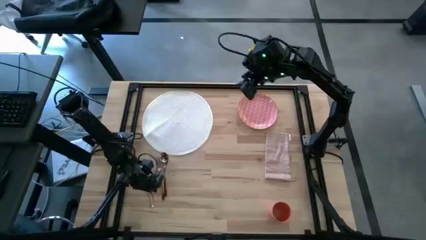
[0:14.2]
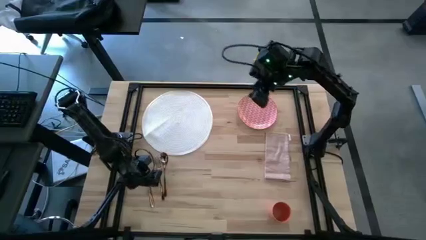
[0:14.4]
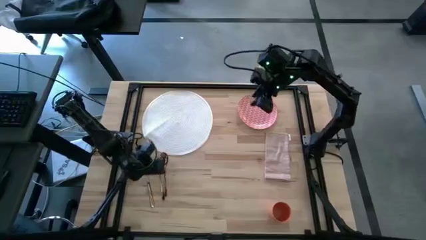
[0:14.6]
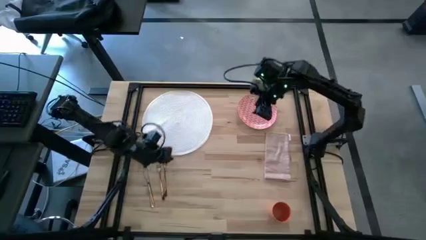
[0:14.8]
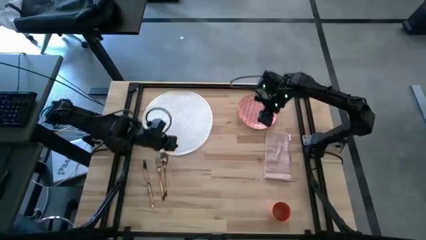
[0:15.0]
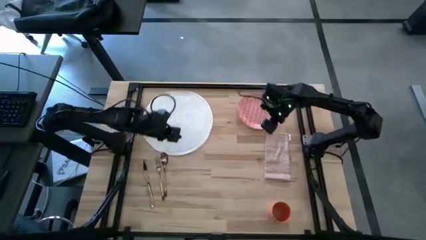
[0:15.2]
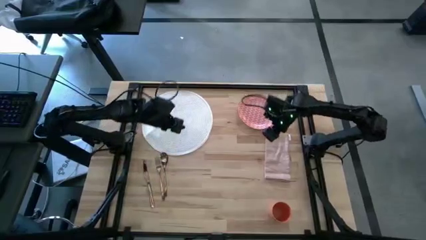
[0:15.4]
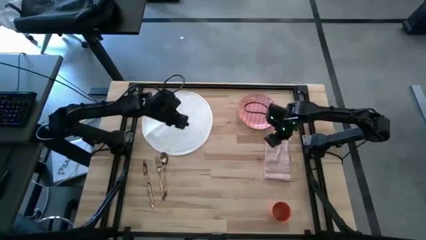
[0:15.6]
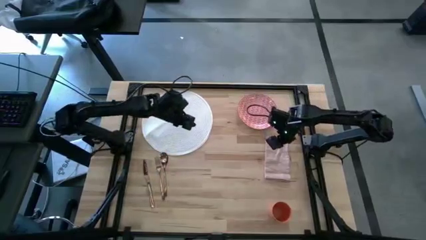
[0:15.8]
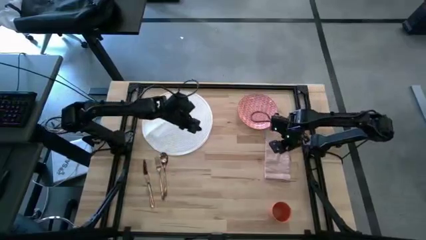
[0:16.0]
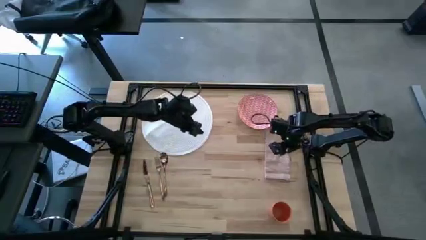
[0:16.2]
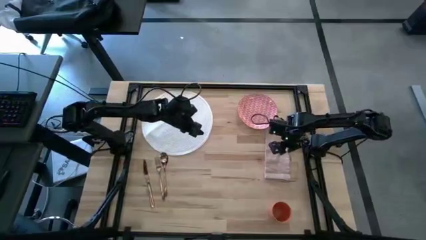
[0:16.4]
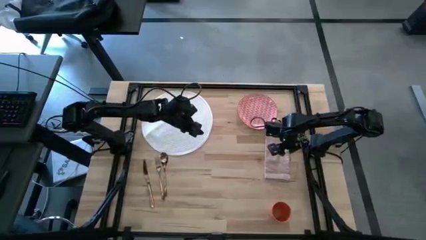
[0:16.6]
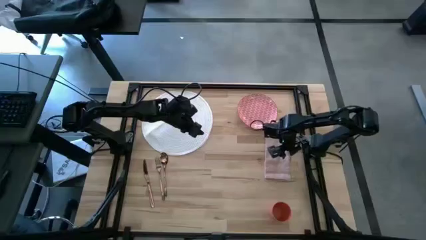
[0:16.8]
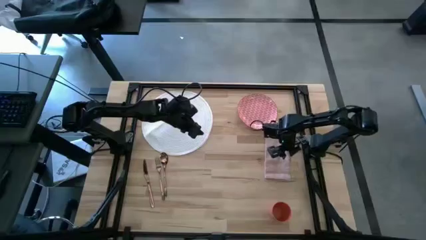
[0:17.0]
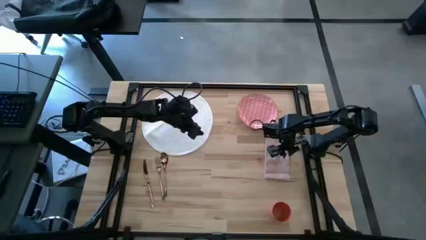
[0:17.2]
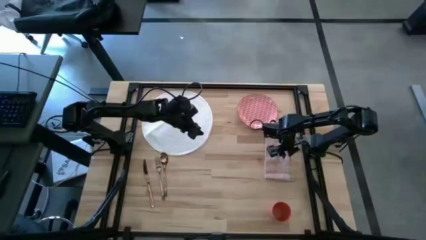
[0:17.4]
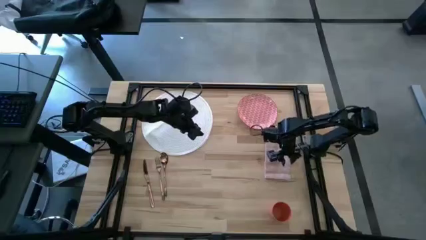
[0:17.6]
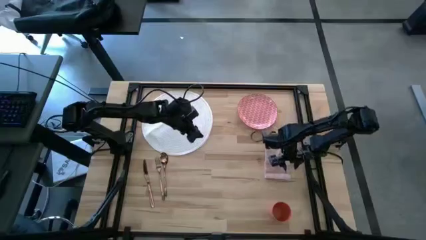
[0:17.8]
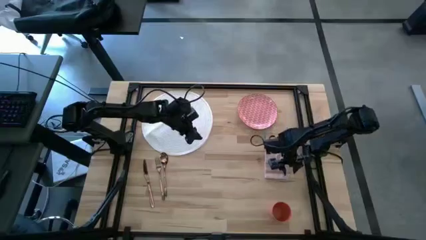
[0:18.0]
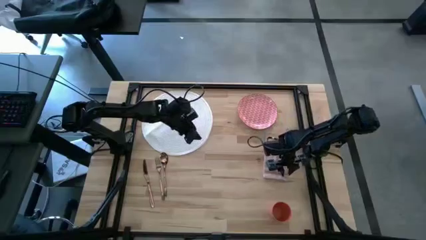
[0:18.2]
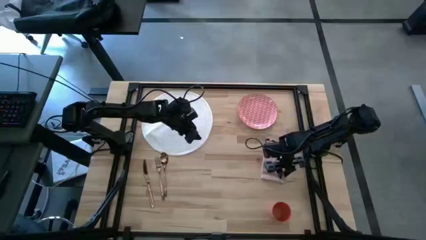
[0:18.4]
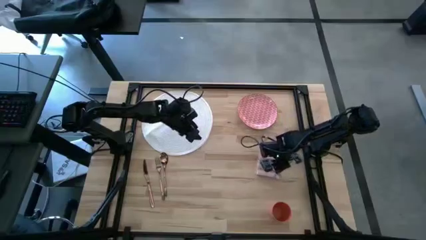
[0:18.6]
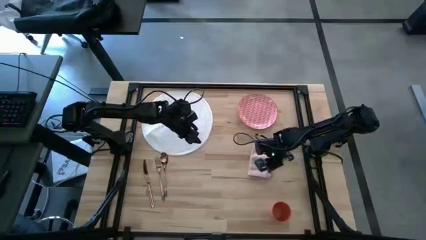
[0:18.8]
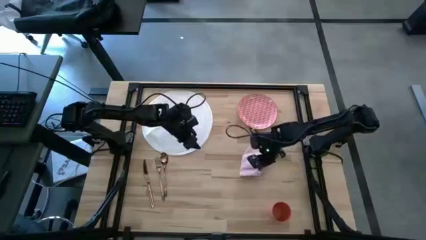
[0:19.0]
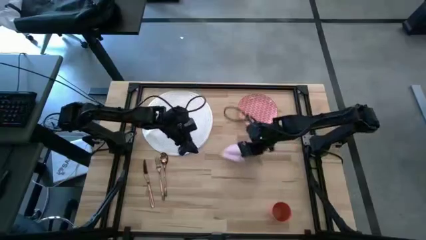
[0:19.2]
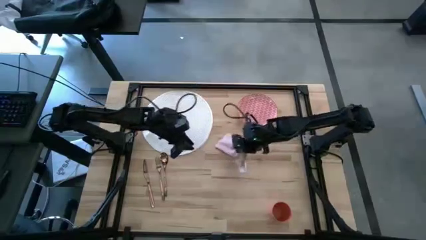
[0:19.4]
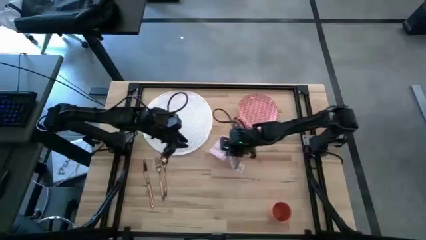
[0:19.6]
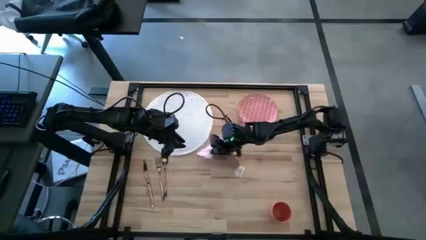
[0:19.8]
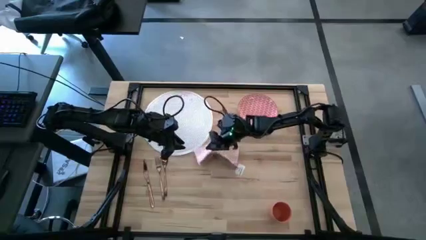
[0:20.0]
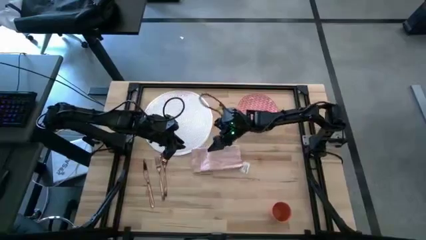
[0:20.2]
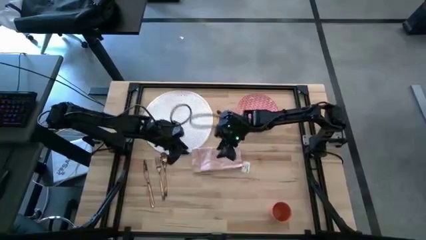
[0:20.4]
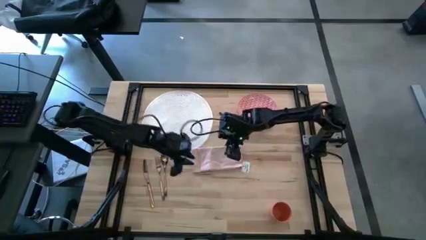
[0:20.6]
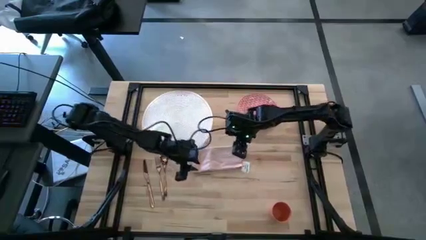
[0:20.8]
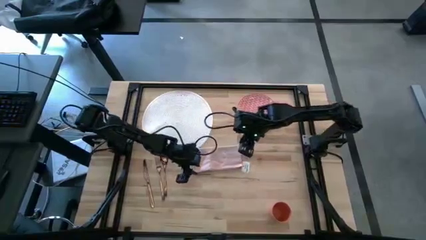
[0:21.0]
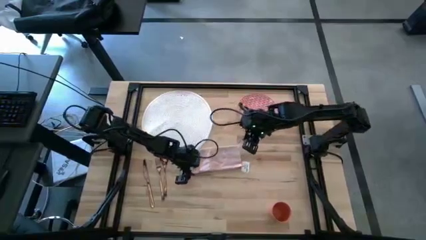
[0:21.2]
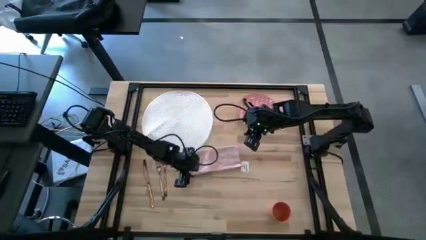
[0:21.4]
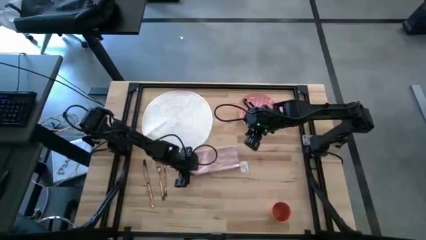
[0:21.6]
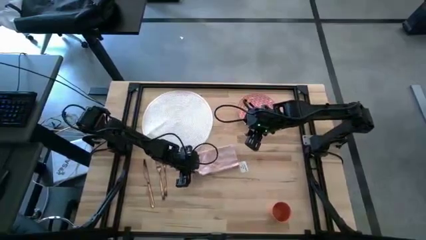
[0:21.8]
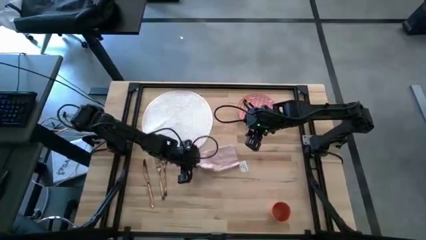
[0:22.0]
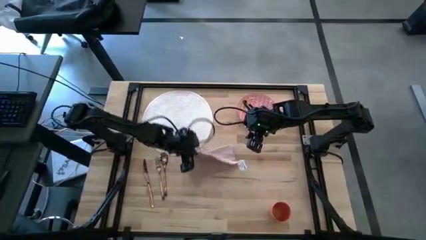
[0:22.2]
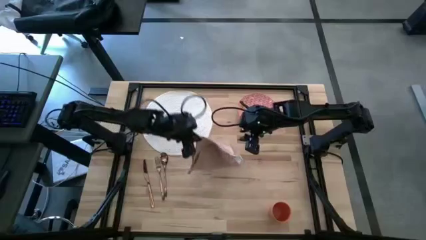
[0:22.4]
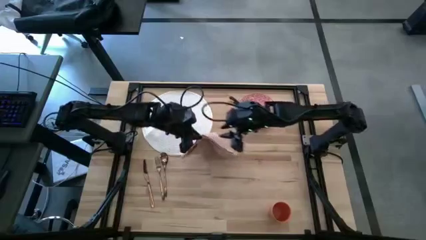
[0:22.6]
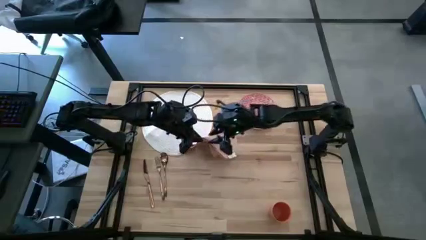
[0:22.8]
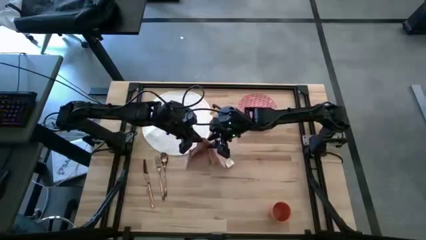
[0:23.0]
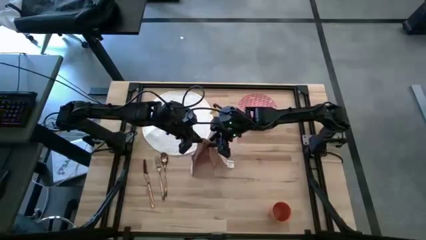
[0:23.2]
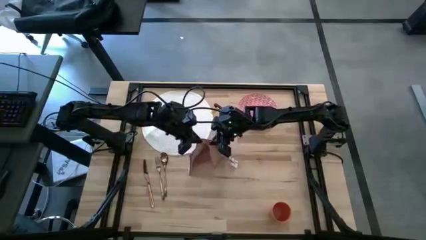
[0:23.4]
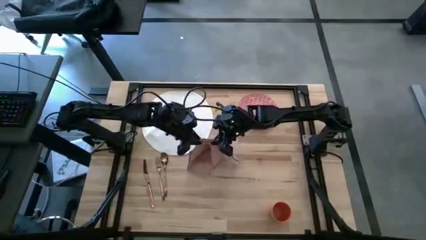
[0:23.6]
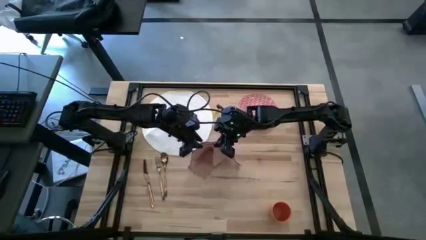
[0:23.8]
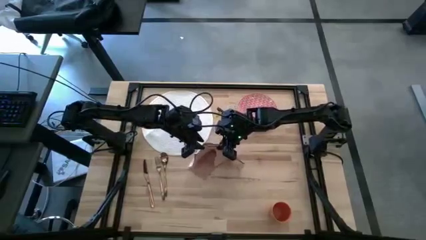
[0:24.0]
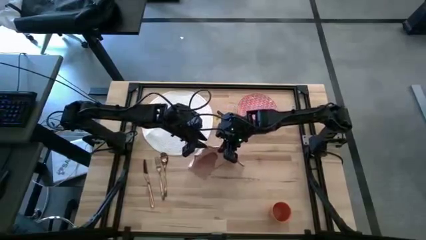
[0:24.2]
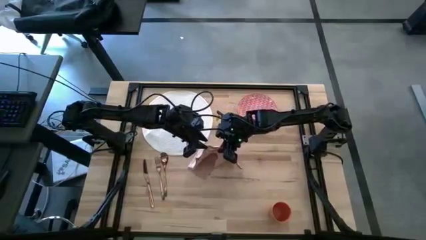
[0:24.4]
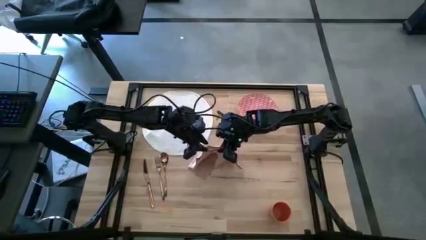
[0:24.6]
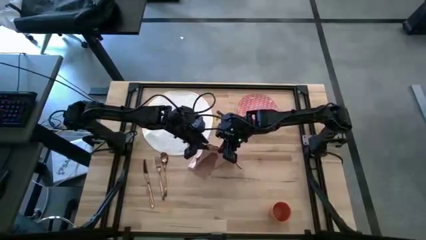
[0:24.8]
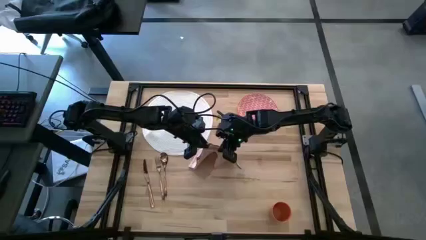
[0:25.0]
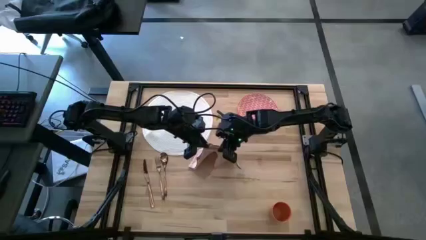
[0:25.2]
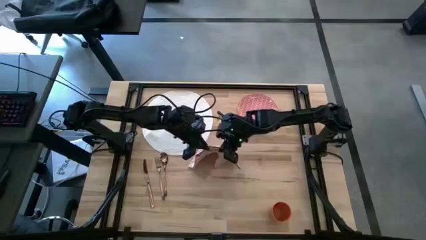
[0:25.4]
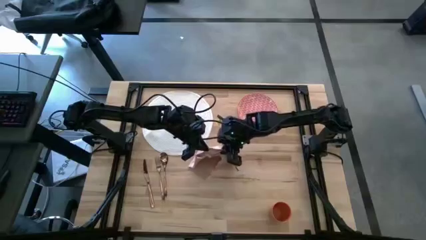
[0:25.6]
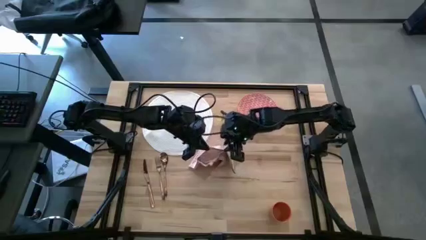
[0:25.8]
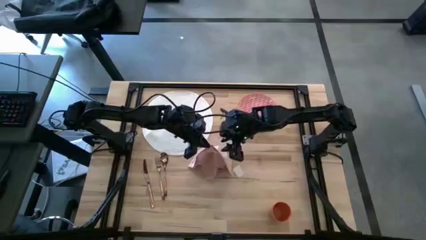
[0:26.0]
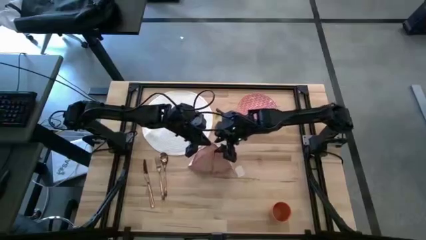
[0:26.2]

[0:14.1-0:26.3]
Task: Set table place
Fold the pink napkin

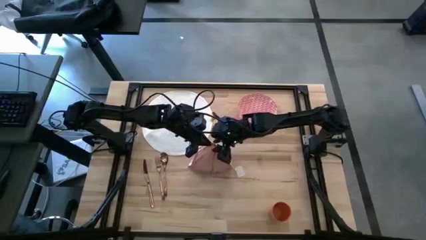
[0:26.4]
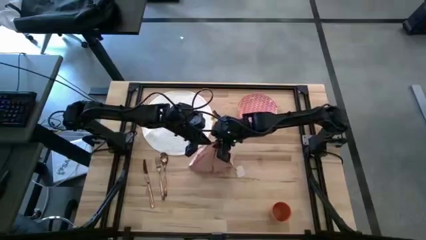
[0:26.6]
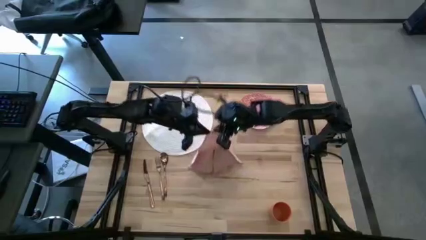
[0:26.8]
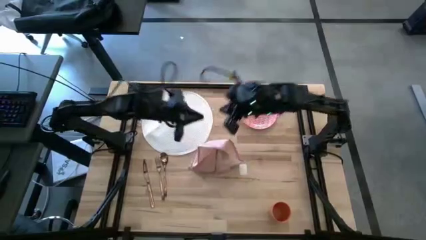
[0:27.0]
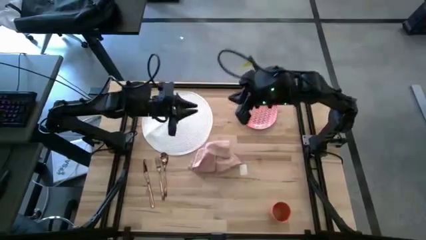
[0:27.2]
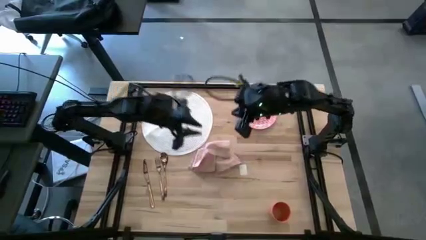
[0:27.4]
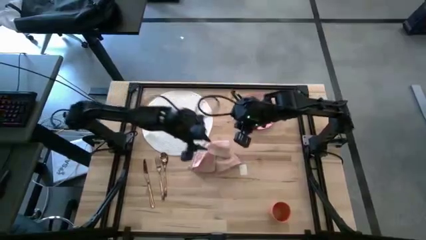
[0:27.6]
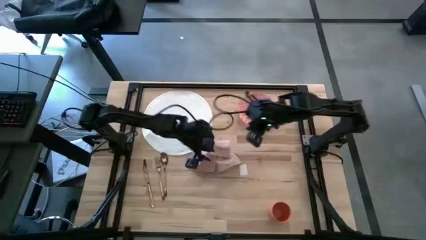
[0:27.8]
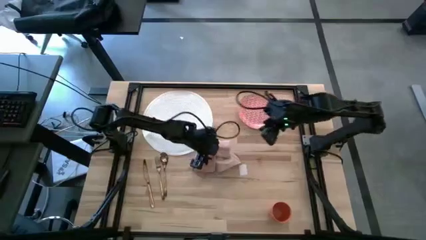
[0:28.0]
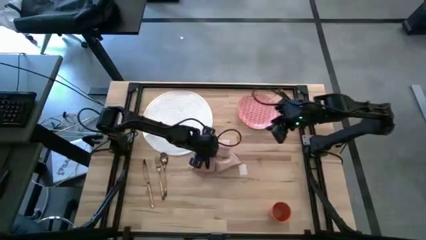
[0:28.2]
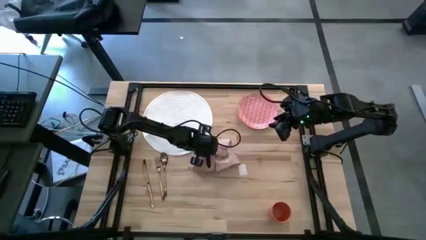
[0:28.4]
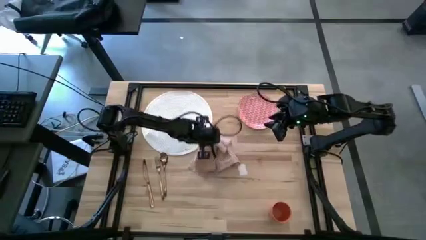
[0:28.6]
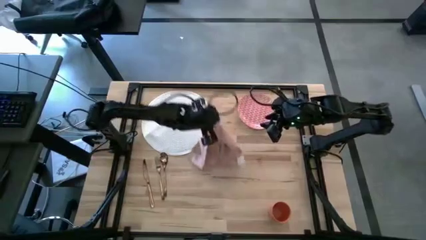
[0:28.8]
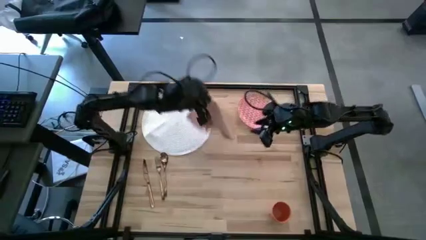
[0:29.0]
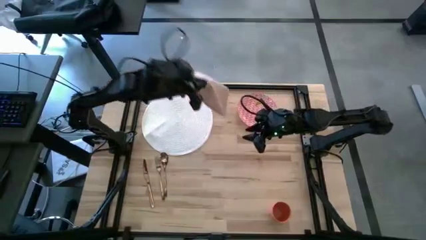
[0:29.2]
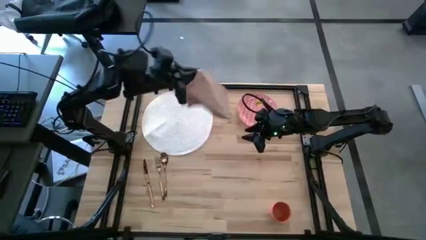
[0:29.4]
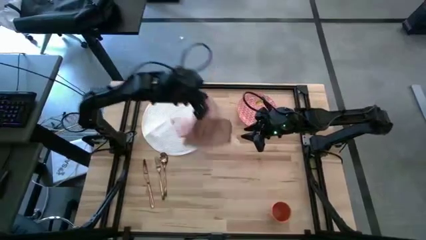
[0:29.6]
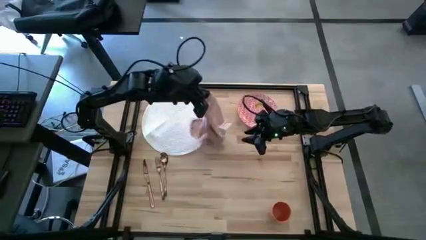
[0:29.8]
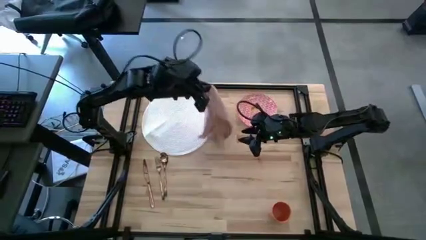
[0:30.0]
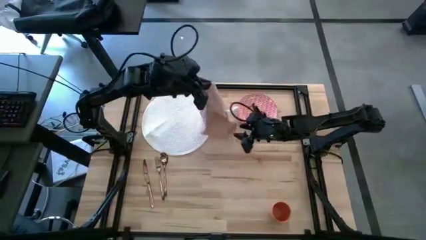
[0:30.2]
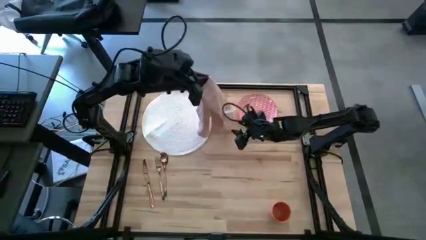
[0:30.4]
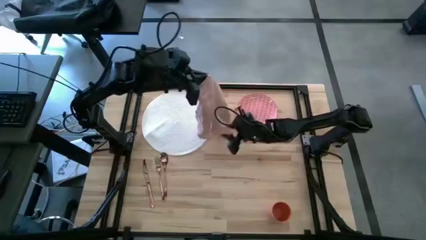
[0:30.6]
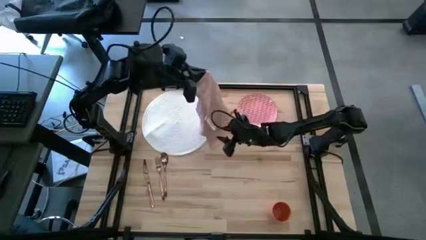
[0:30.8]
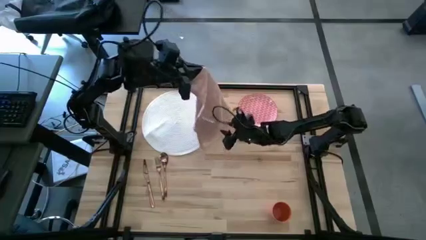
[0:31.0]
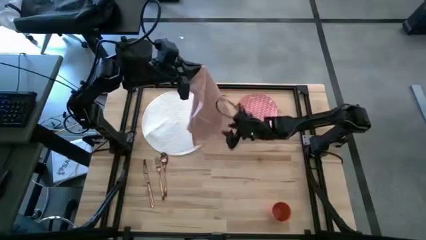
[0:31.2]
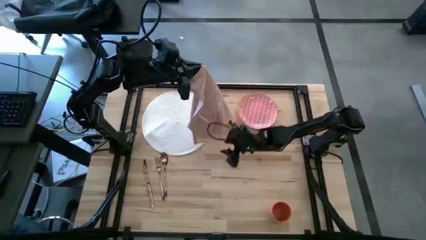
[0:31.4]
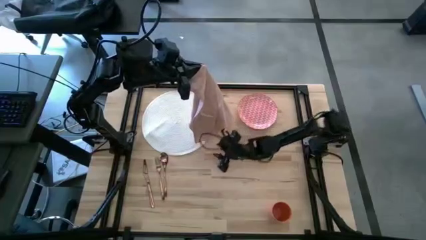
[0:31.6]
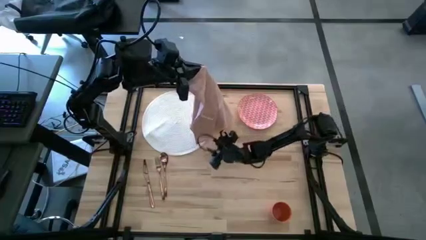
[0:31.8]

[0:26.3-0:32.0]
Fold the pink napkin
